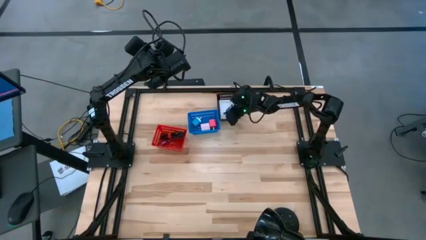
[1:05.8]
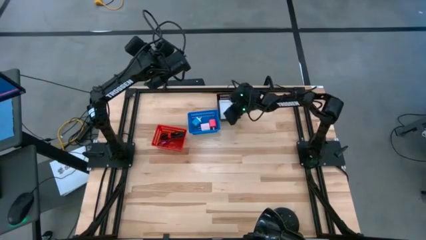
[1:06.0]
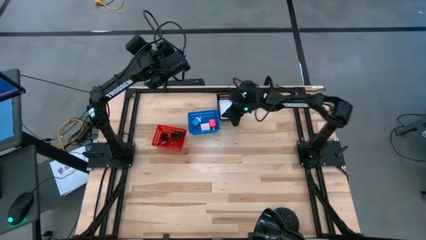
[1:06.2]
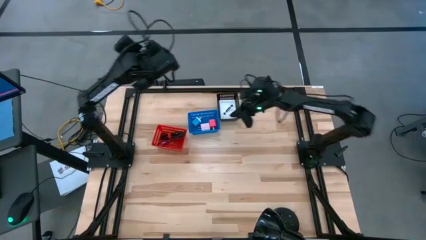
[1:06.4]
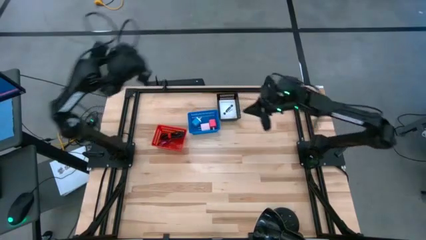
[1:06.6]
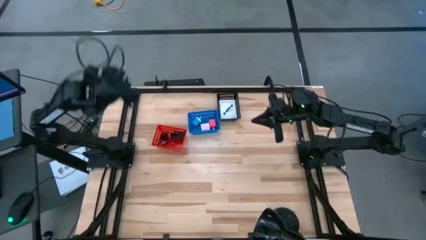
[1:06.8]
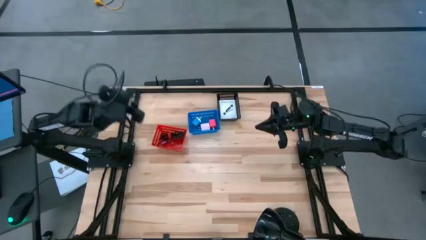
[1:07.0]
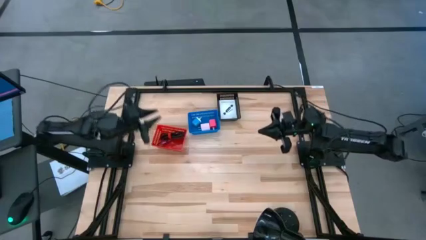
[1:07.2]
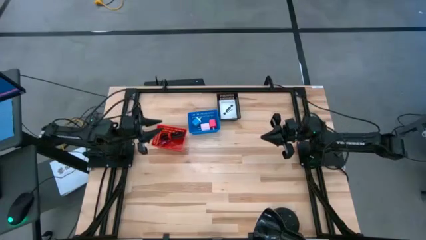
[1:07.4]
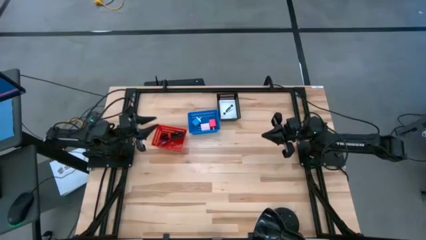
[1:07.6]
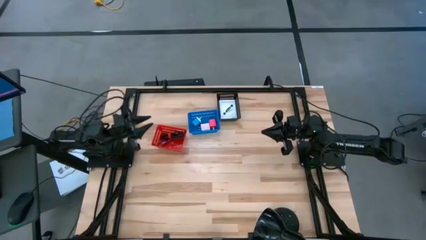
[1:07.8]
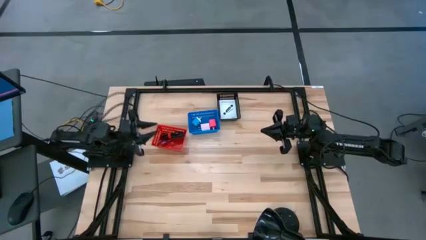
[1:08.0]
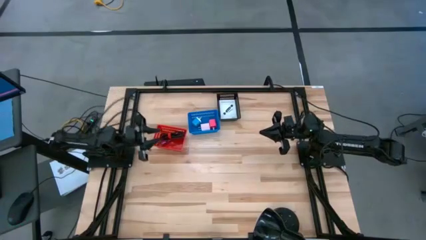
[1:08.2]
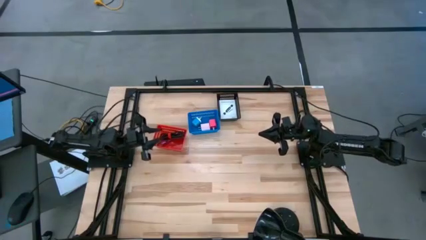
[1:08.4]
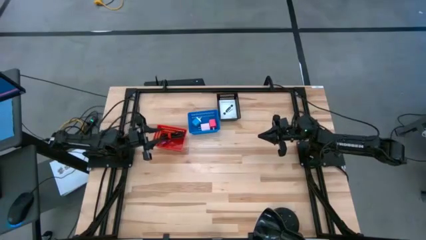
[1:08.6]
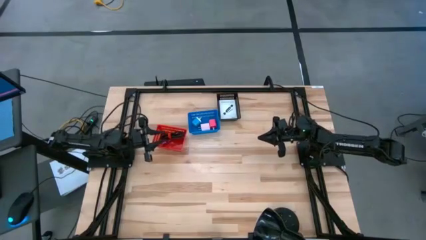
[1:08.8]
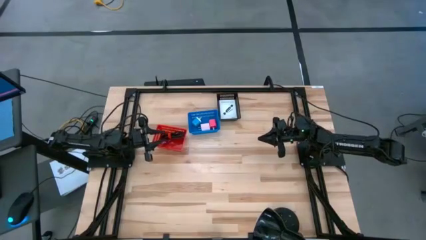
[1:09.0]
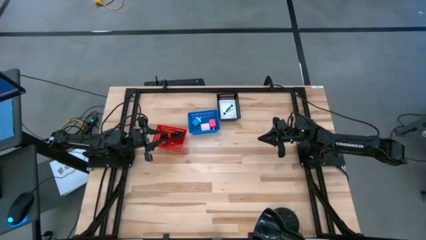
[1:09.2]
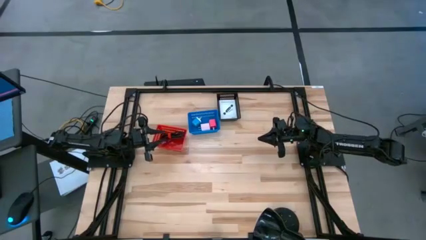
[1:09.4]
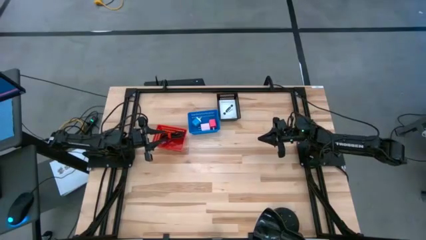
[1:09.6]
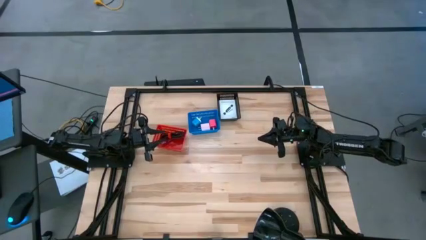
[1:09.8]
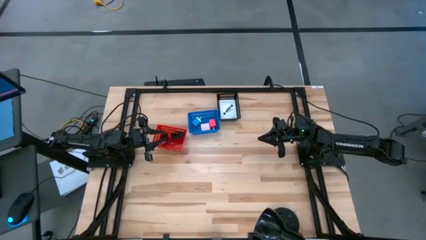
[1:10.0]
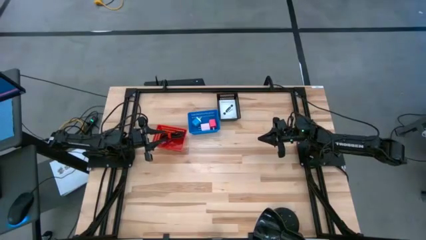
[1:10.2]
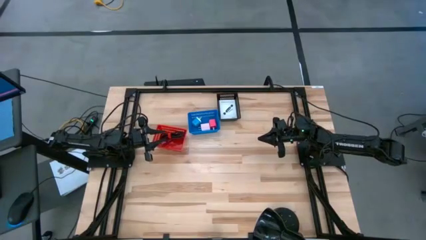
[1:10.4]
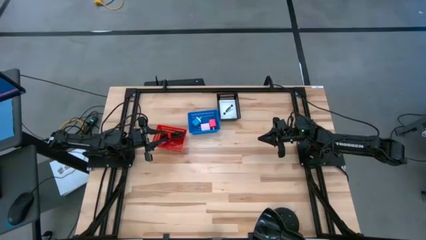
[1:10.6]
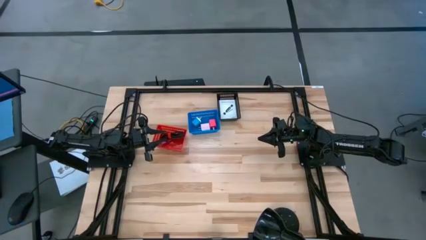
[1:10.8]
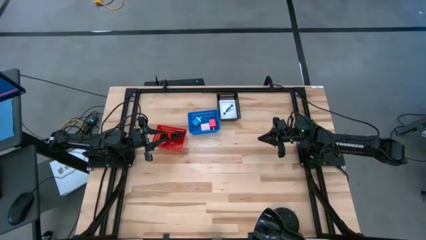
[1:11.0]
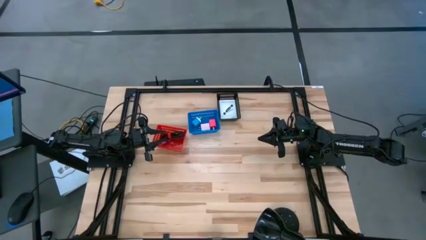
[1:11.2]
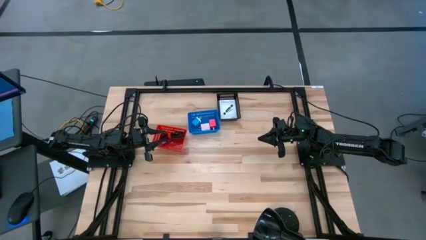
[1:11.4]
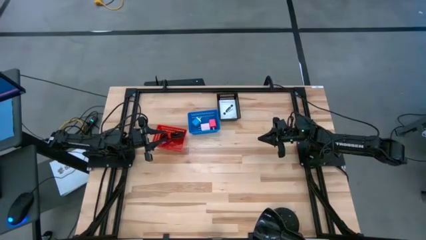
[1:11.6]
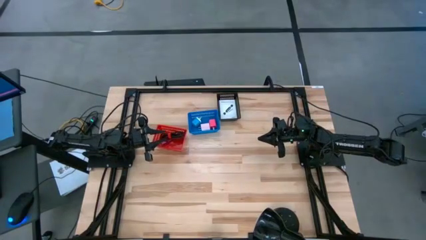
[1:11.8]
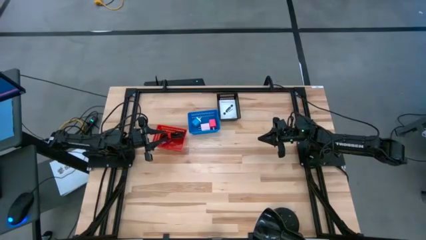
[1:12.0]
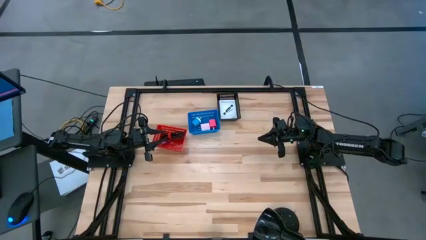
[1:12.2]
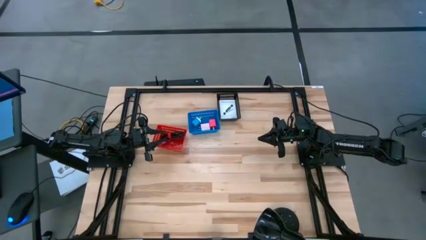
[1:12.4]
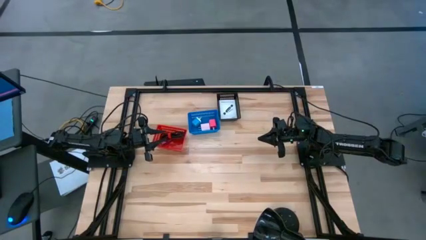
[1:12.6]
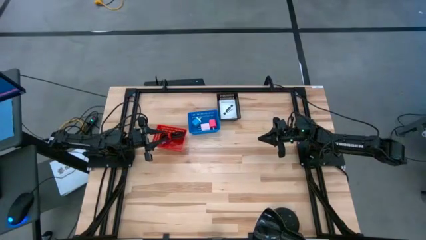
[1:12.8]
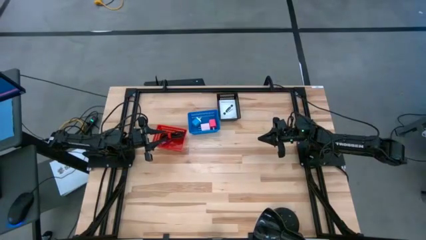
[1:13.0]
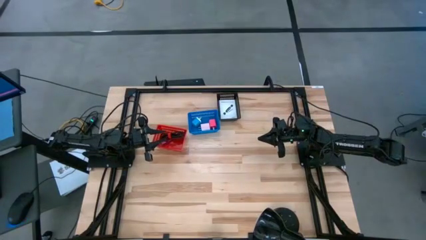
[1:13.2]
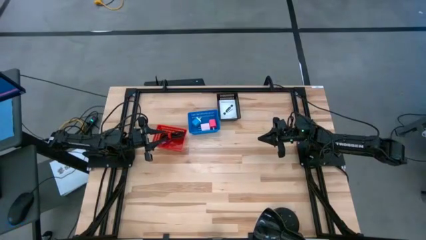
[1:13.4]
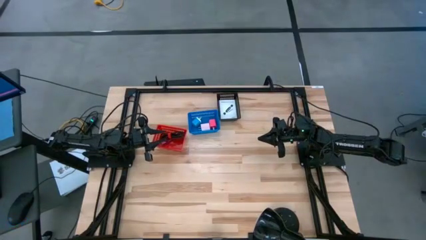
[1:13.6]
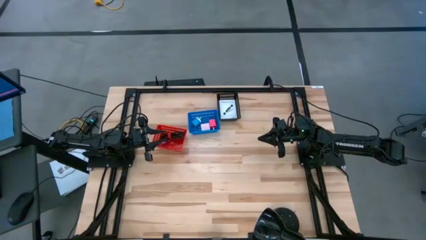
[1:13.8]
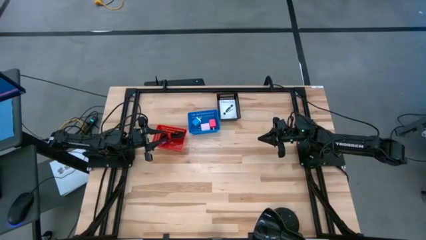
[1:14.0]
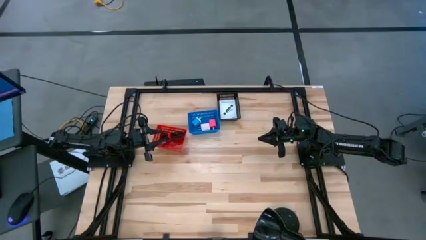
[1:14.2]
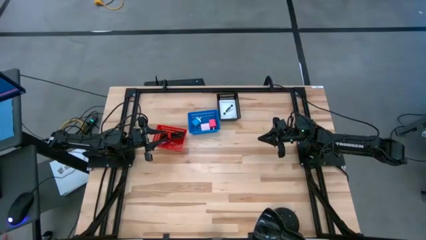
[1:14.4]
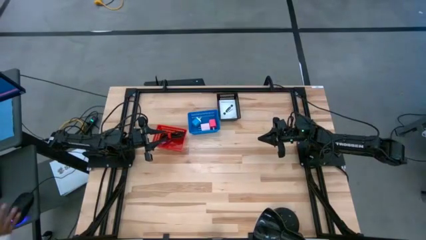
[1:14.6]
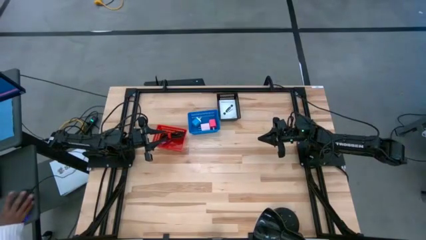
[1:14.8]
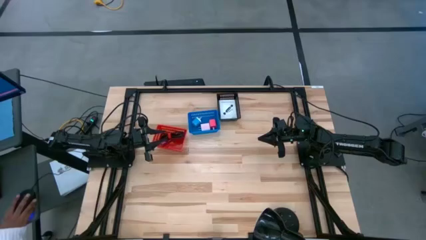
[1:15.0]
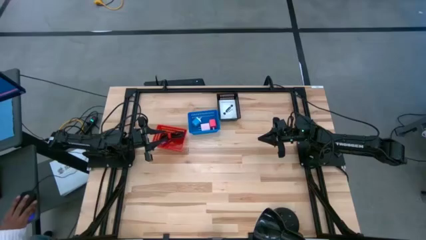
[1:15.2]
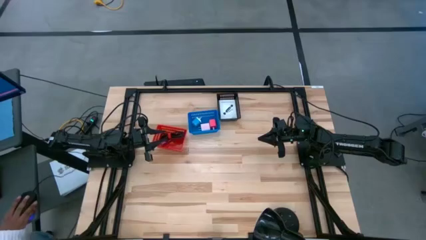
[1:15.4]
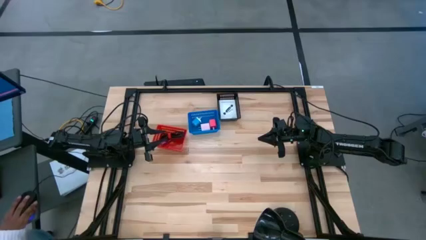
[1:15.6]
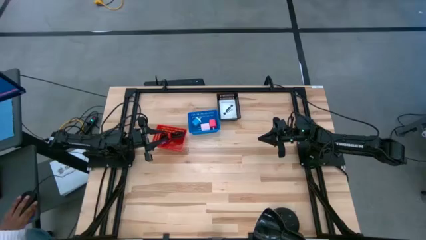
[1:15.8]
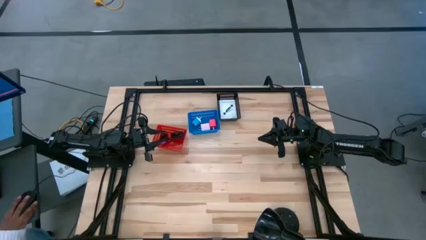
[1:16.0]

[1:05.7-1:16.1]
Task: Pick and place items into bin
Return to Home Position
